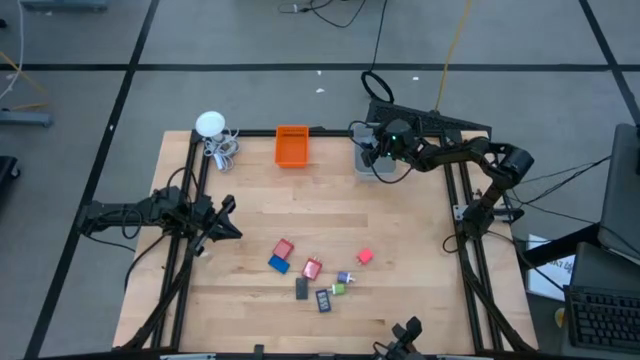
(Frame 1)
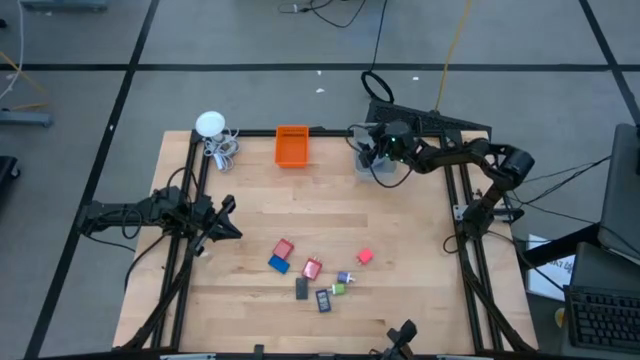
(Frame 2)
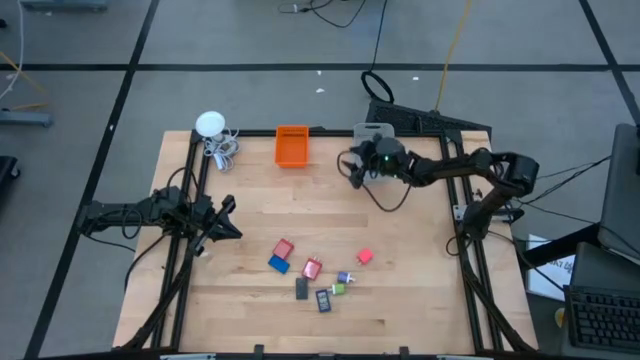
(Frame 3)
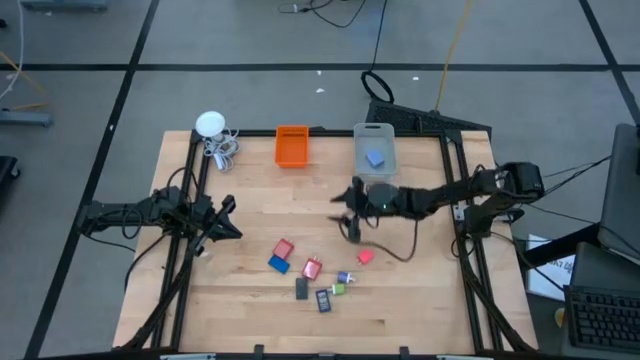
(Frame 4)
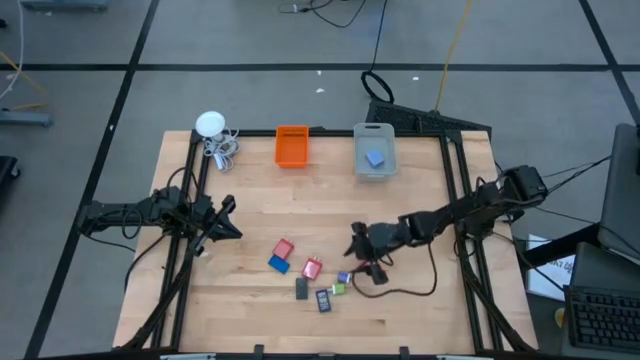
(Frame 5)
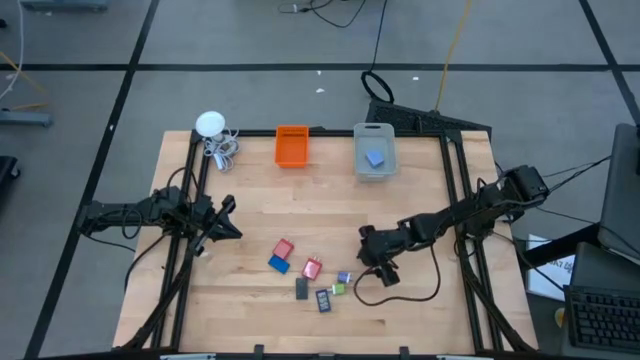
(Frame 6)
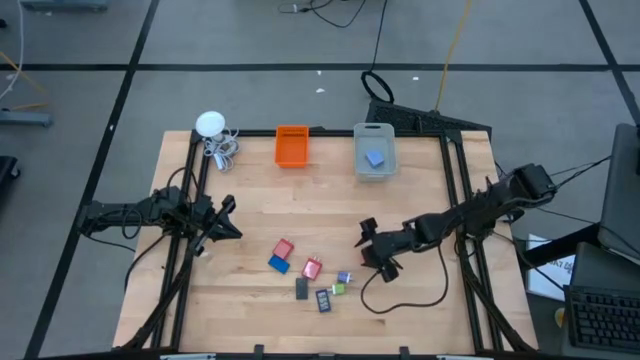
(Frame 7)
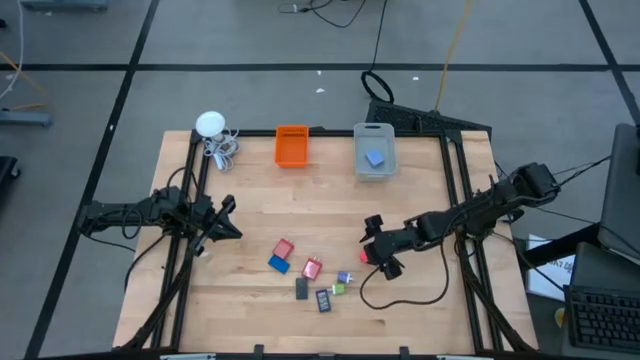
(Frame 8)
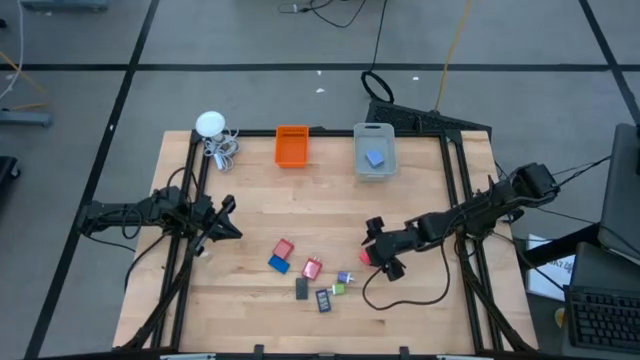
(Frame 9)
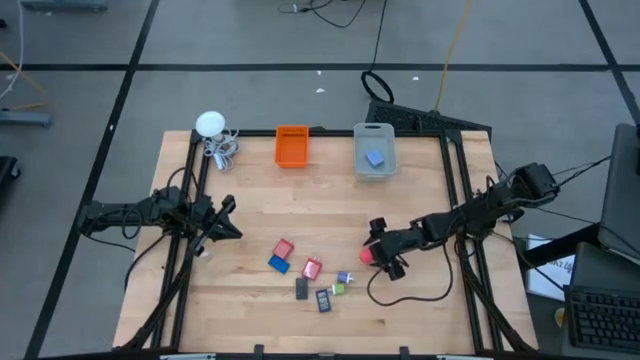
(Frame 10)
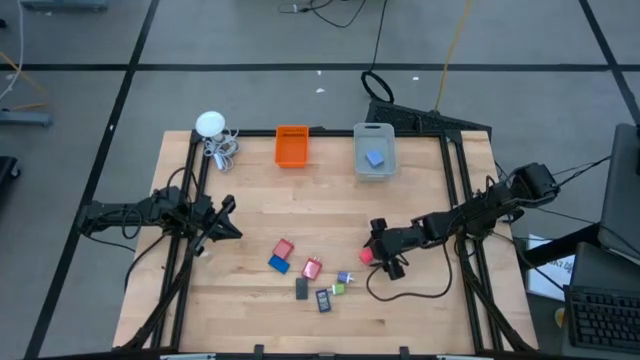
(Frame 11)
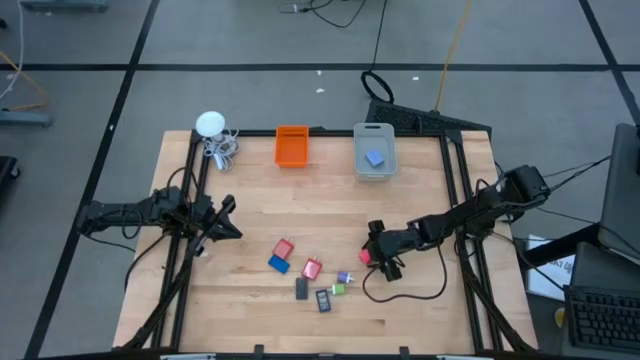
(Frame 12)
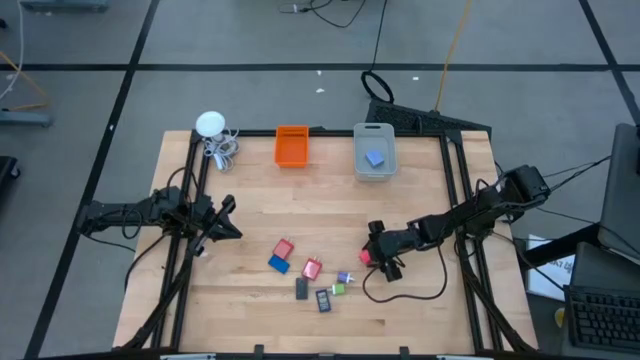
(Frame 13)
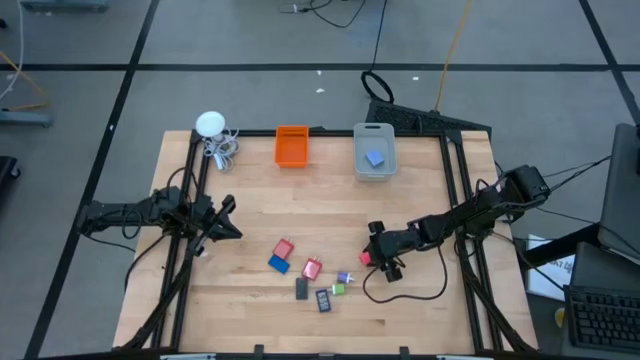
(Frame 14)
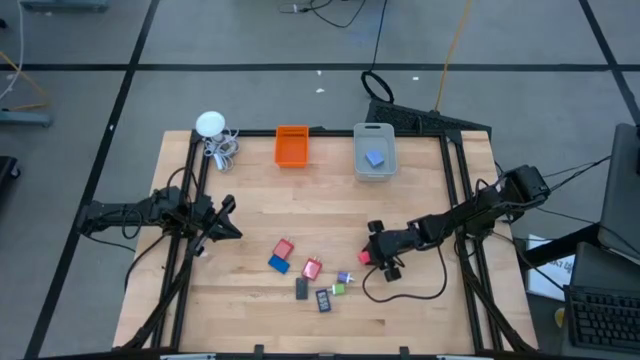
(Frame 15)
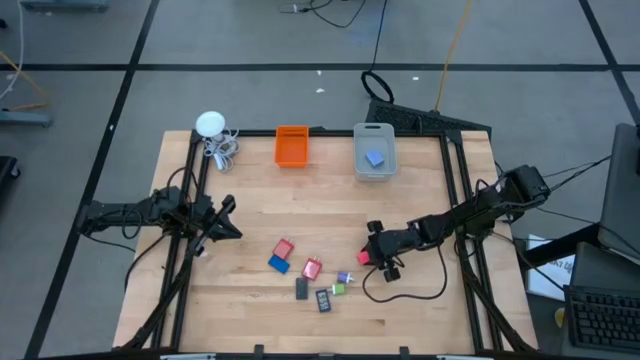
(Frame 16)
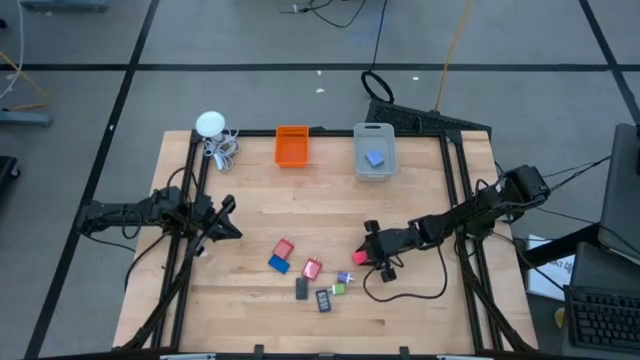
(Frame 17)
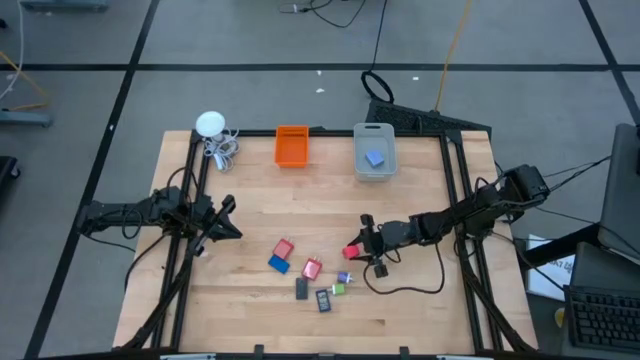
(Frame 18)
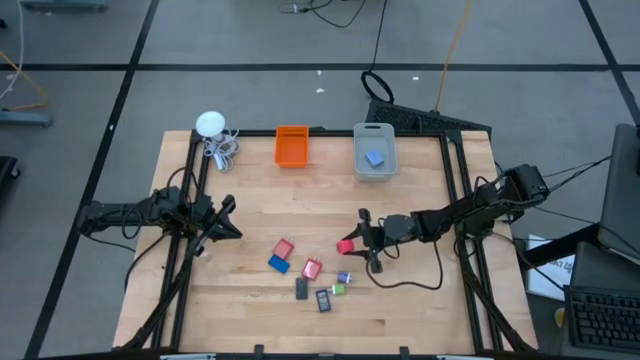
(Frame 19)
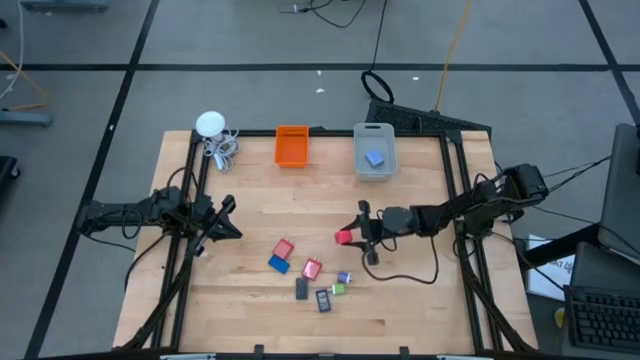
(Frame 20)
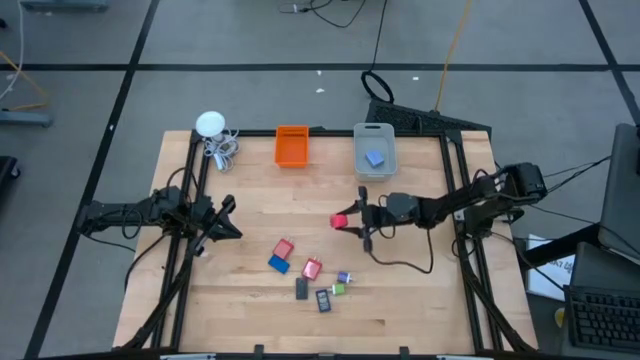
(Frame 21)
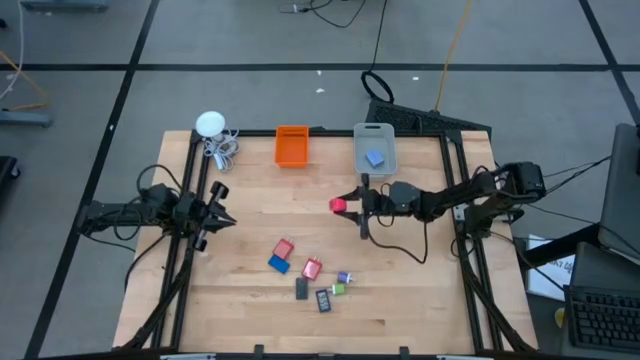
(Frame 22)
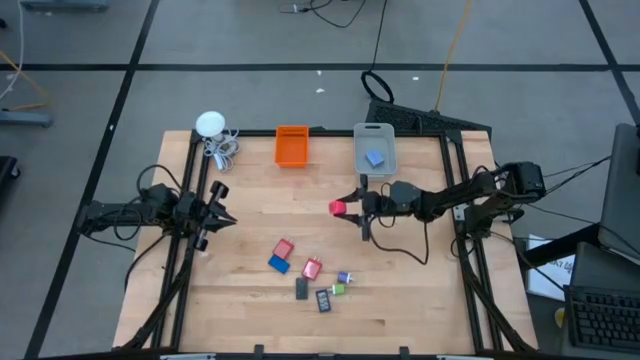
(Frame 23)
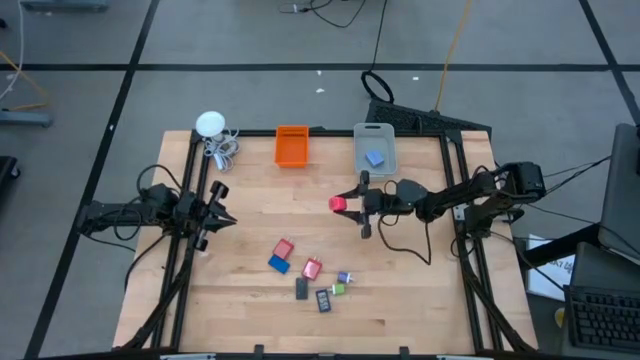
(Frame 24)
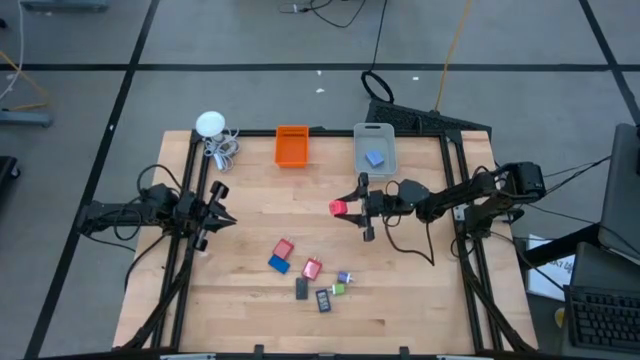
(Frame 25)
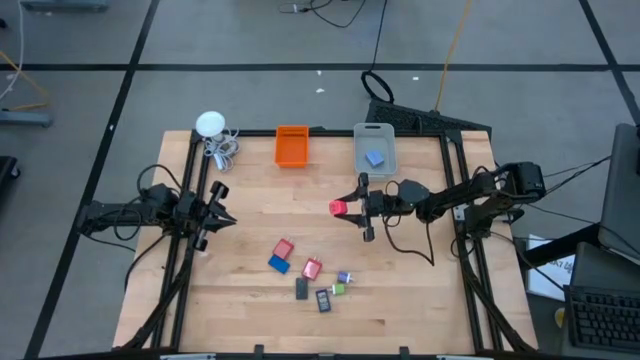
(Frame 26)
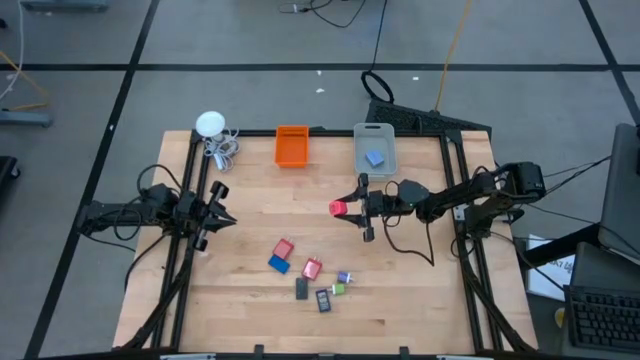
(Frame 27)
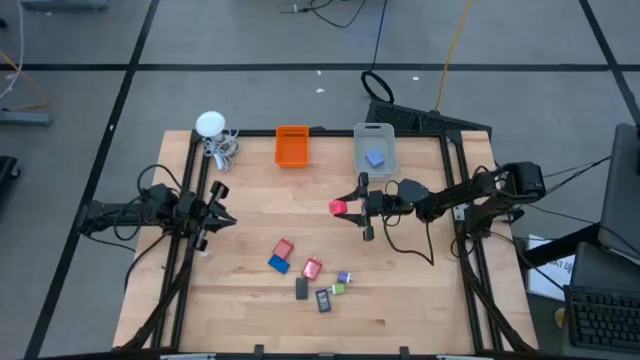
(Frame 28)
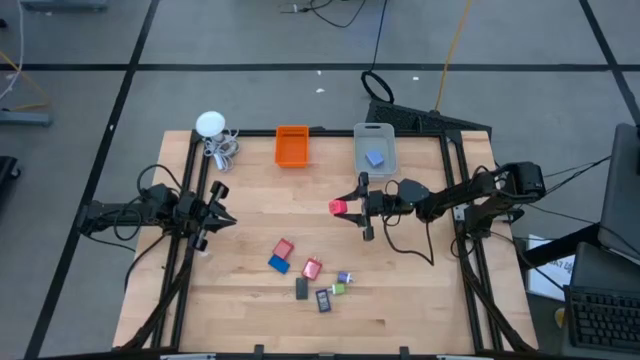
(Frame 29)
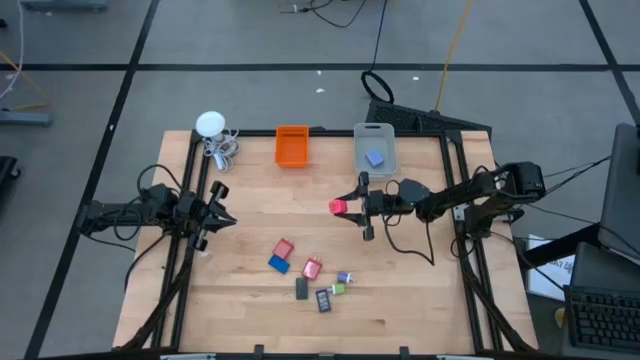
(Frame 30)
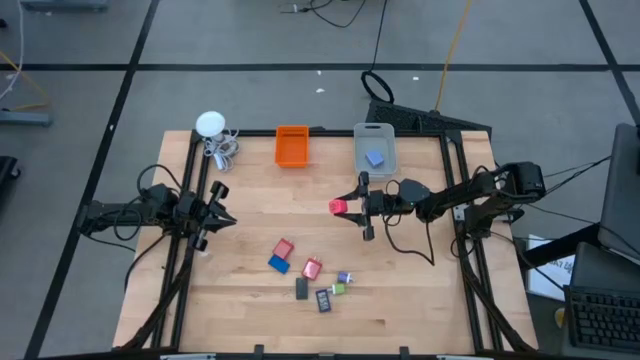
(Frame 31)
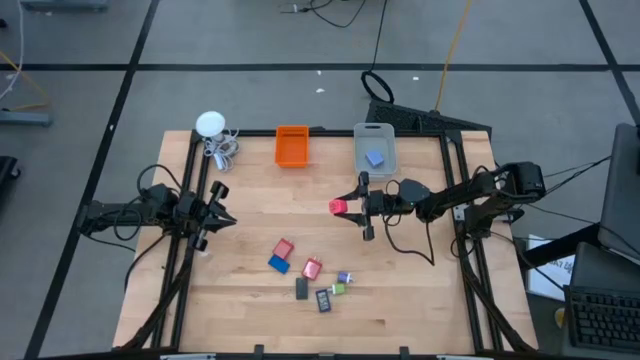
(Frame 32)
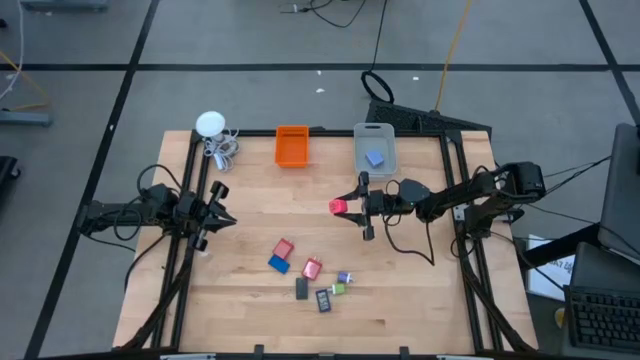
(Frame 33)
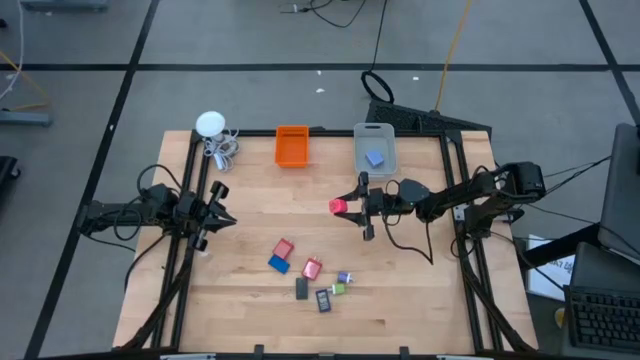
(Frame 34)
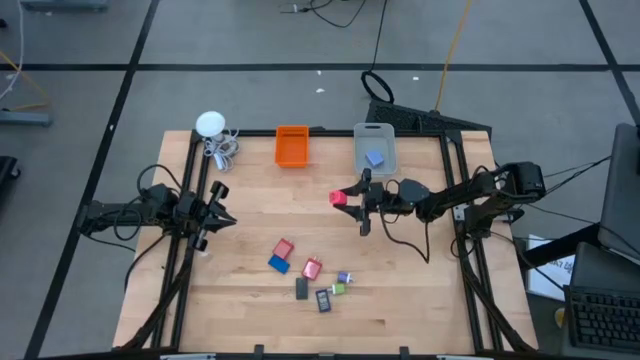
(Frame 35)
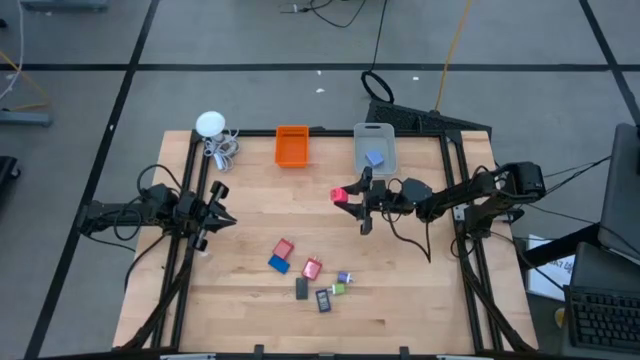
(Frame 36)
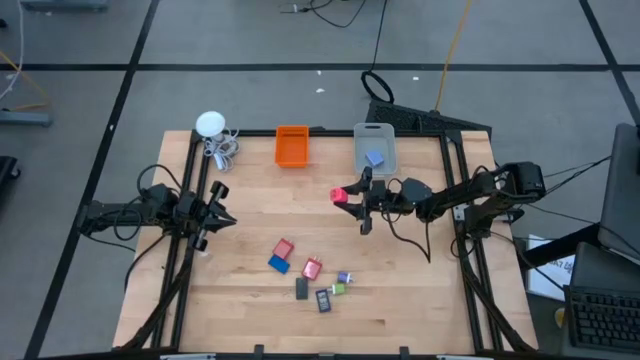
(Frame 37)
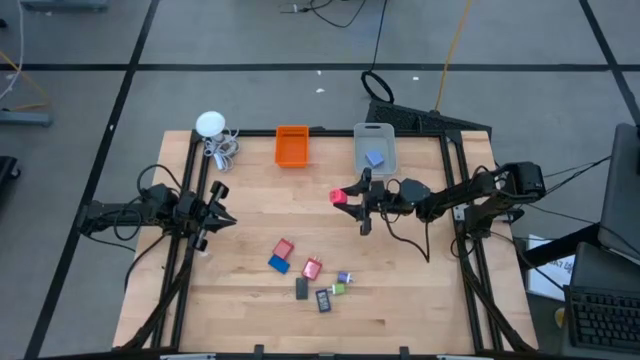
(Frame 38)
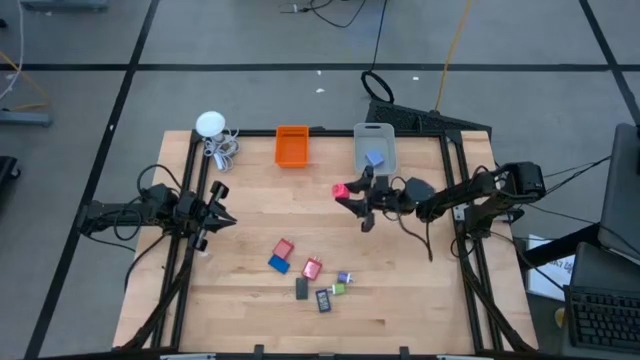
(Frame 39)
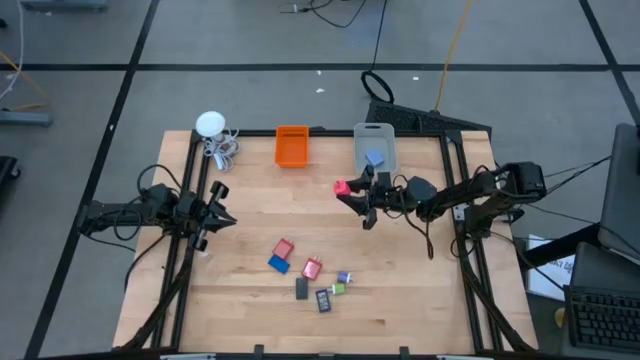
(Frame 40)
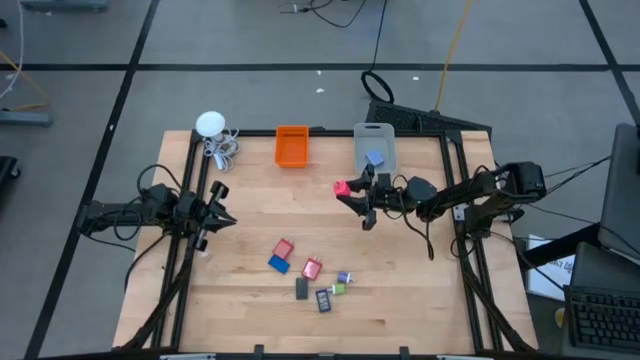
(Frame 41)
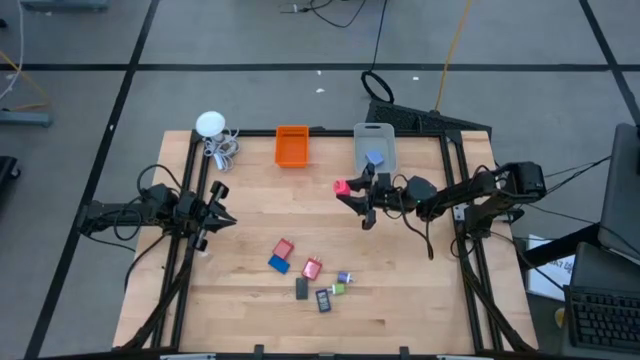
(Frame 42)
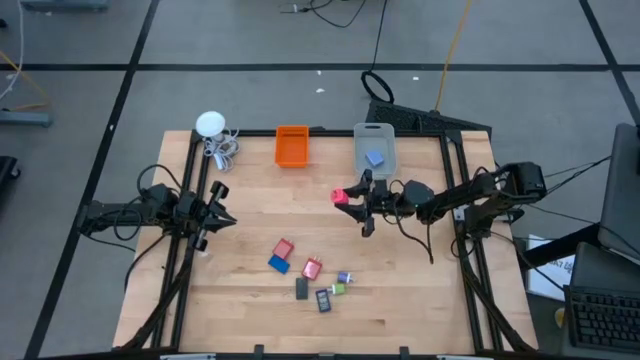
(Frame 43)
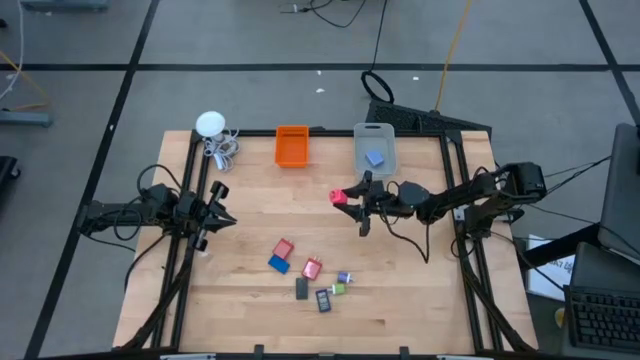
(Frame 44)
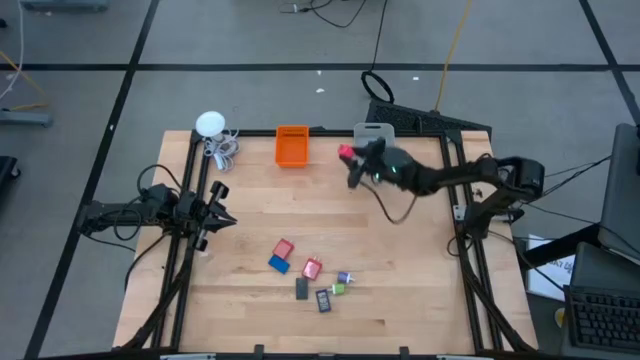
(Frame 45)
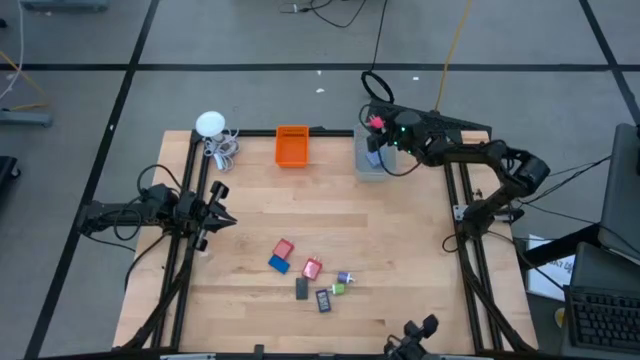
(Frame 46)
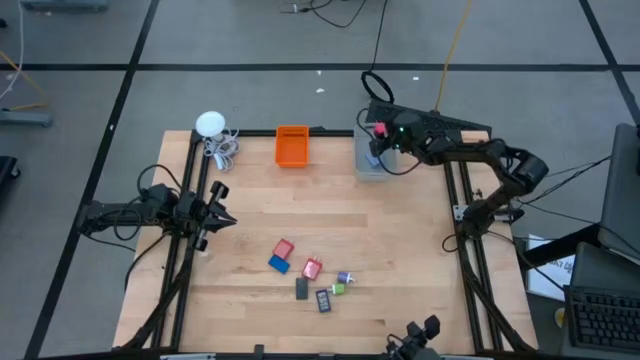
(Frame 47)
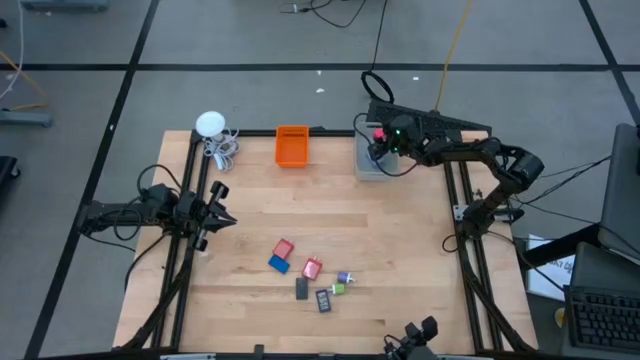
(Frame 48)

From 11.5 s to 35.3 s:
Task: Pick & Place Office items
Put the pink charger adapter into the gray bin
